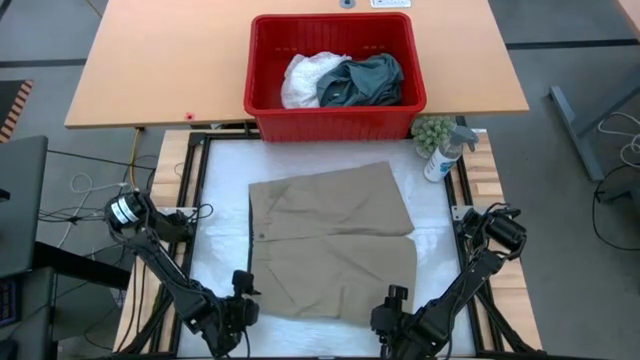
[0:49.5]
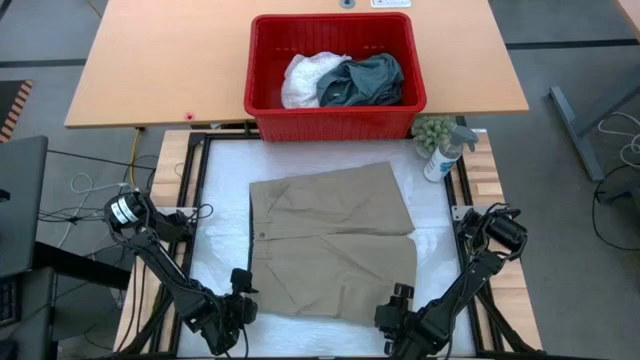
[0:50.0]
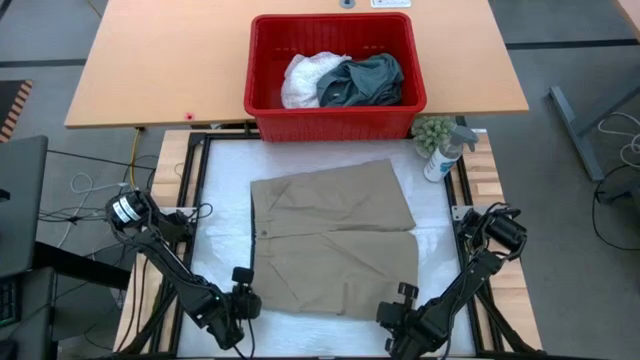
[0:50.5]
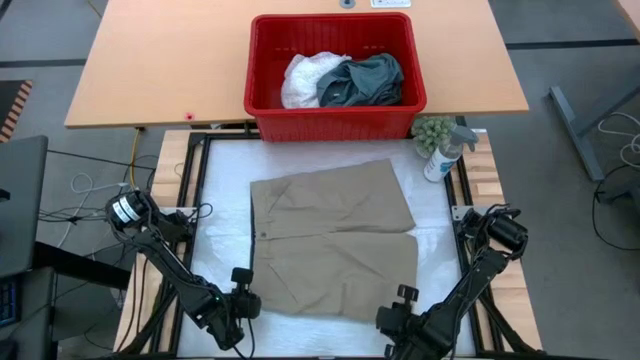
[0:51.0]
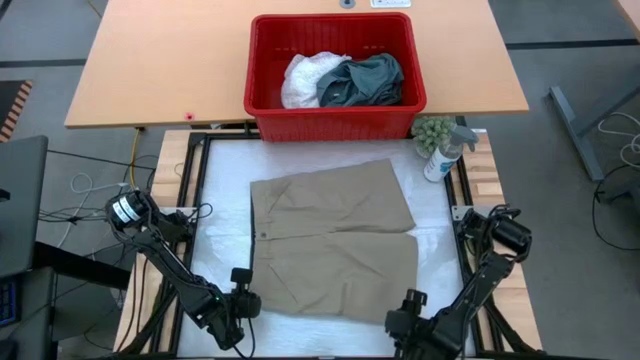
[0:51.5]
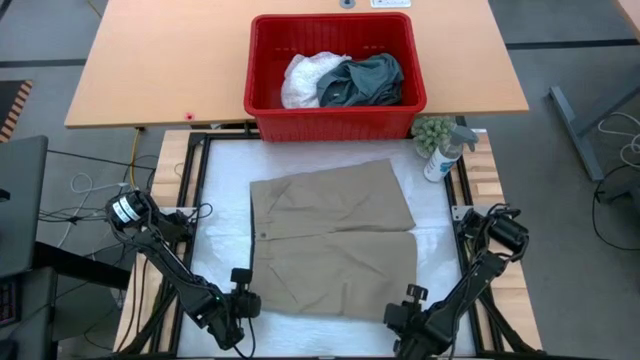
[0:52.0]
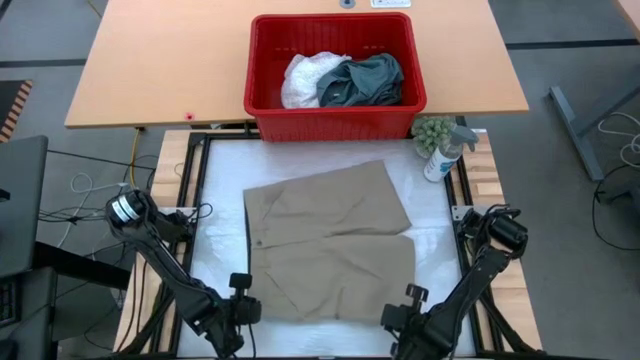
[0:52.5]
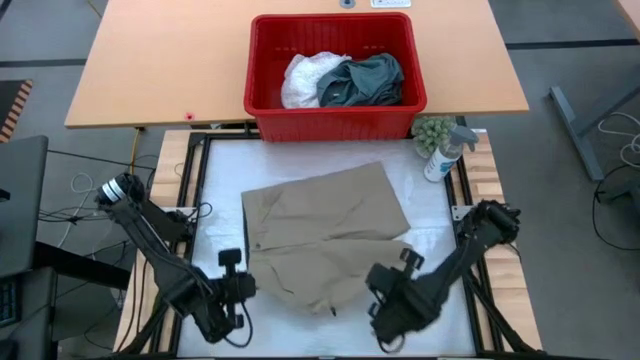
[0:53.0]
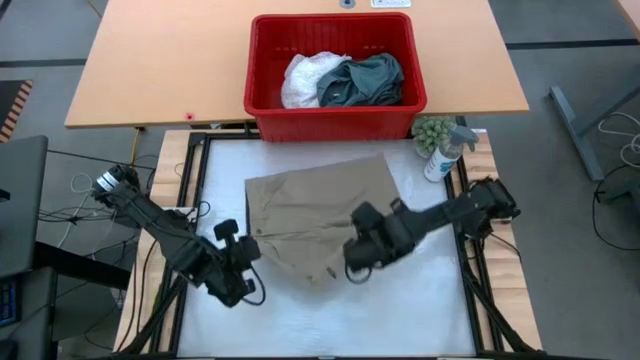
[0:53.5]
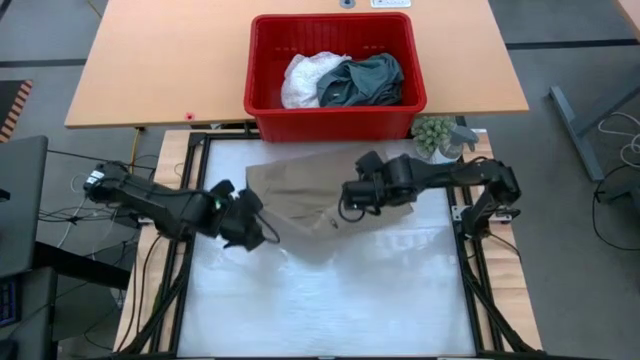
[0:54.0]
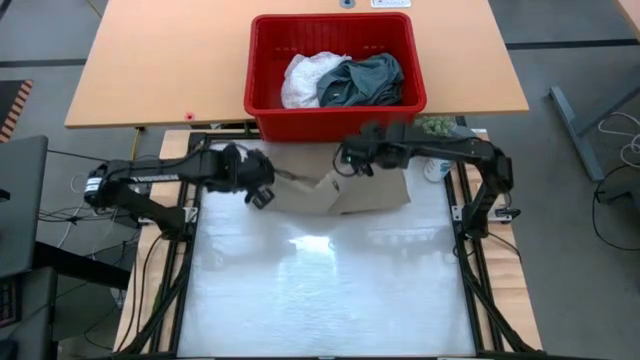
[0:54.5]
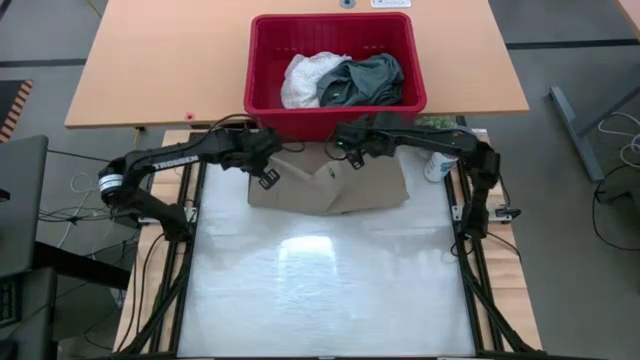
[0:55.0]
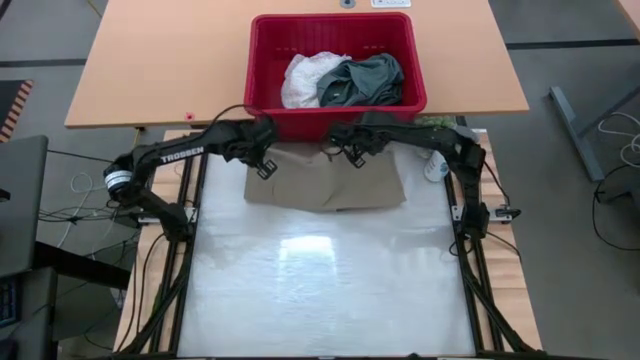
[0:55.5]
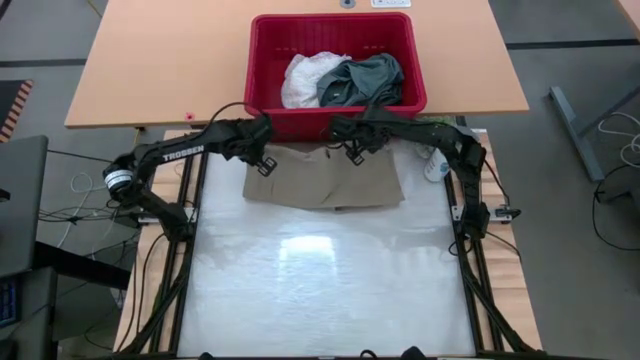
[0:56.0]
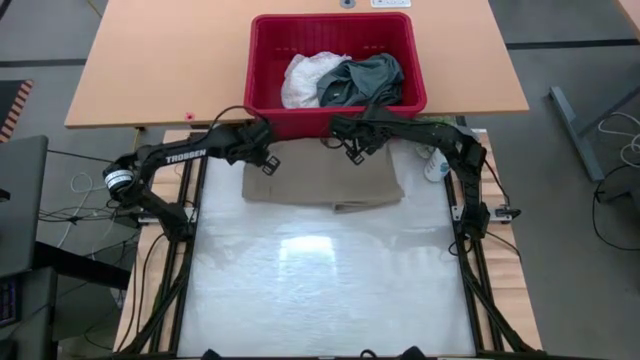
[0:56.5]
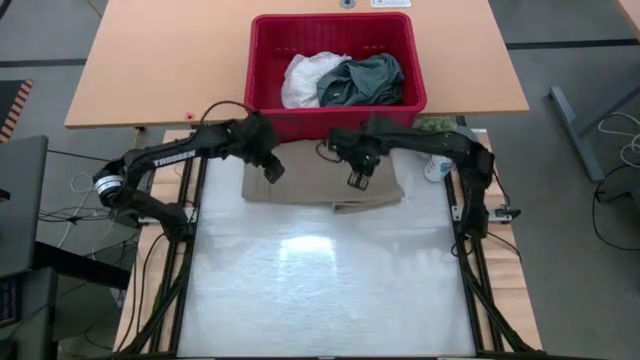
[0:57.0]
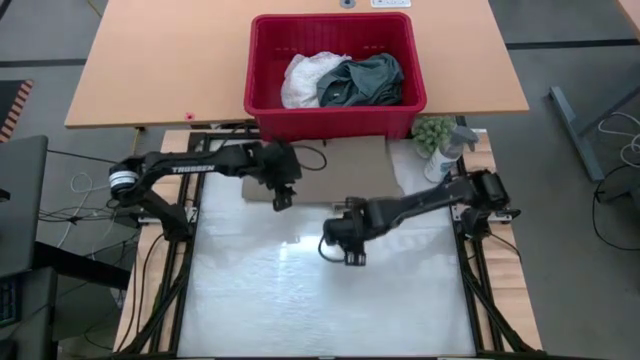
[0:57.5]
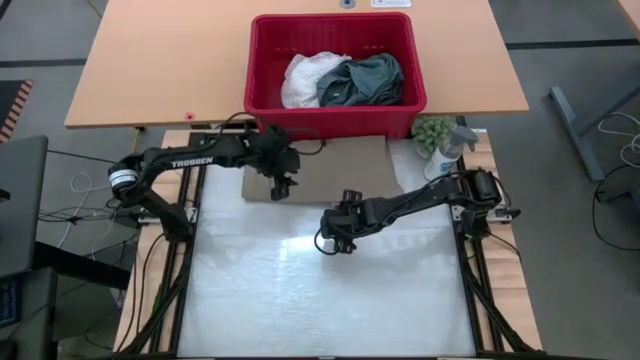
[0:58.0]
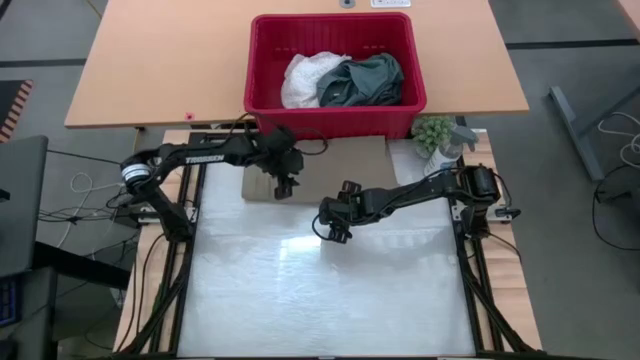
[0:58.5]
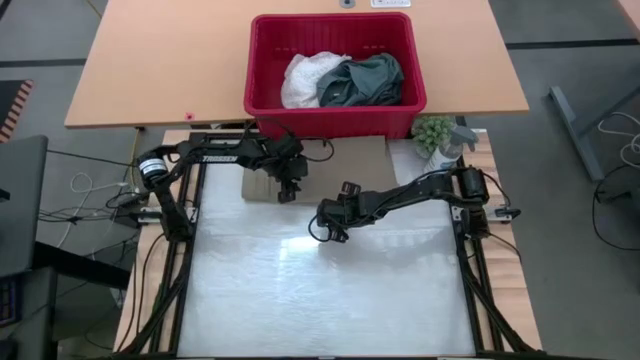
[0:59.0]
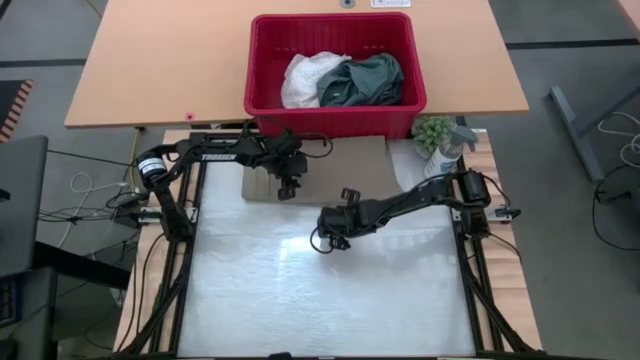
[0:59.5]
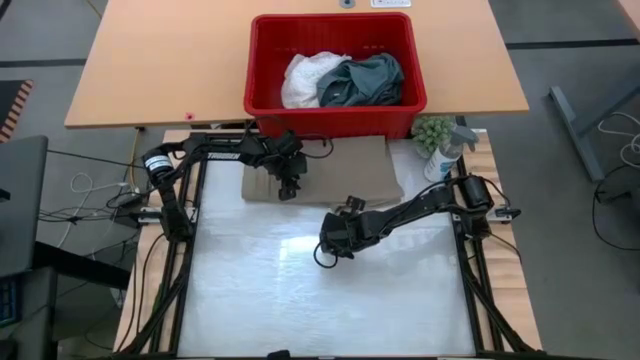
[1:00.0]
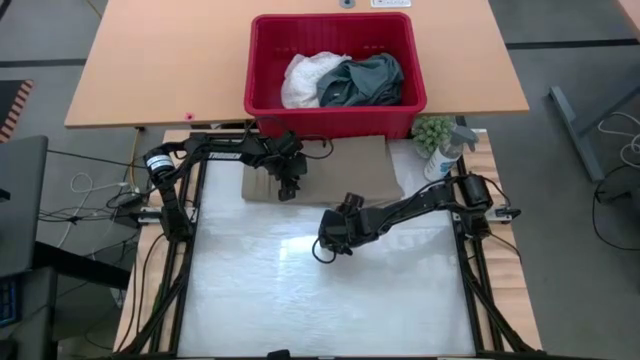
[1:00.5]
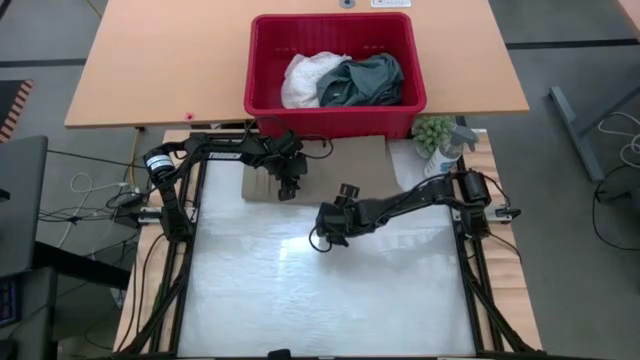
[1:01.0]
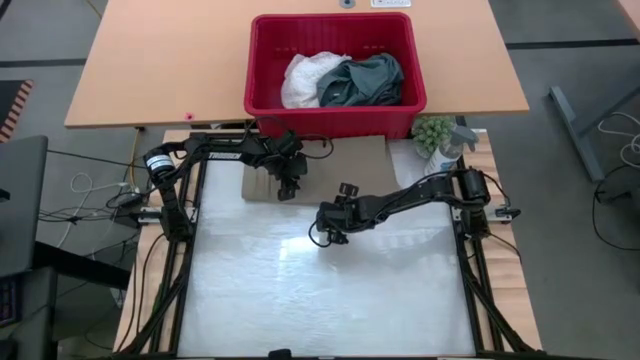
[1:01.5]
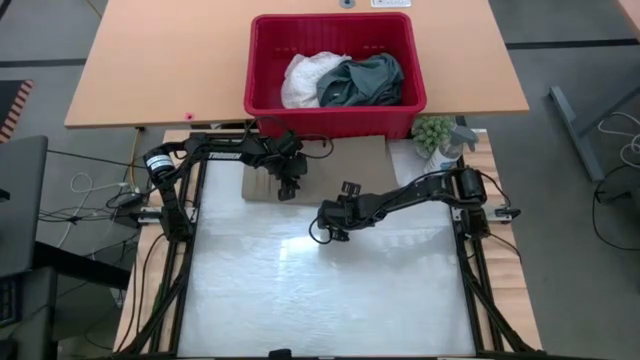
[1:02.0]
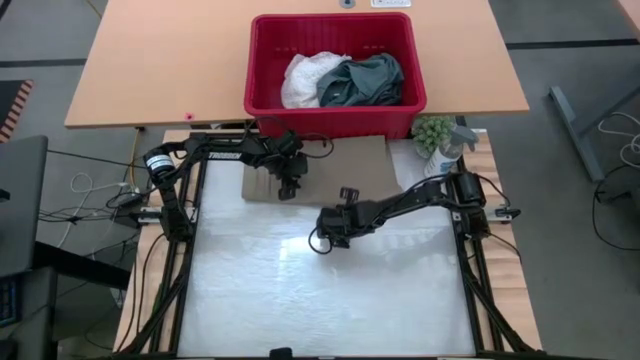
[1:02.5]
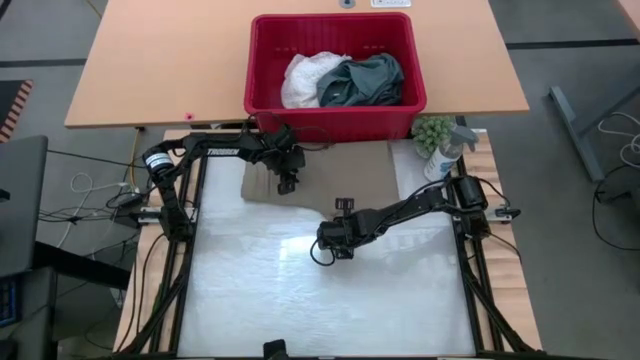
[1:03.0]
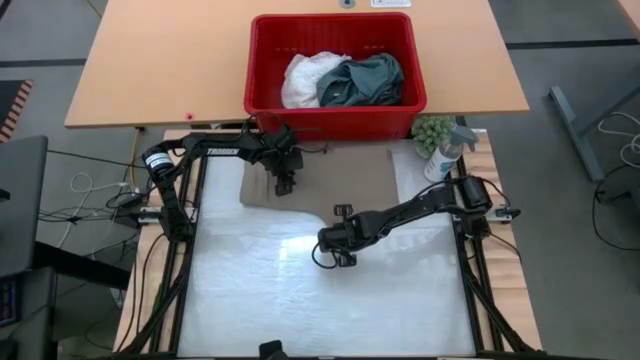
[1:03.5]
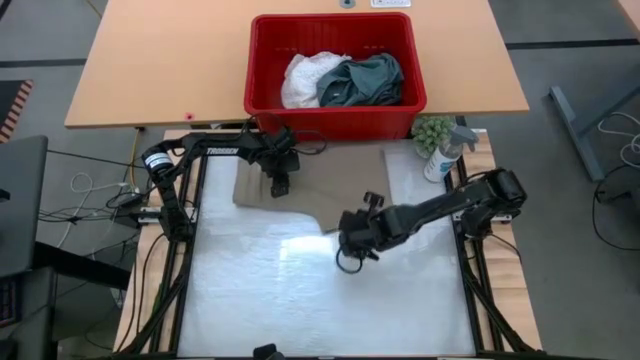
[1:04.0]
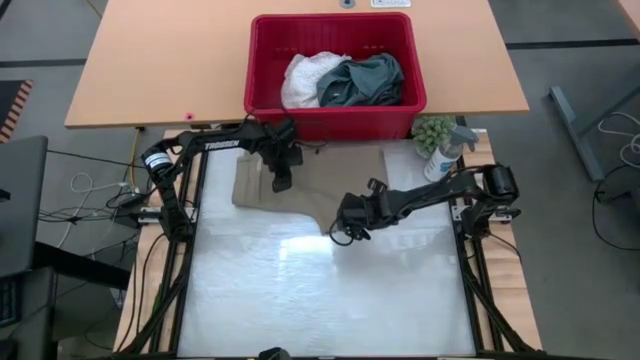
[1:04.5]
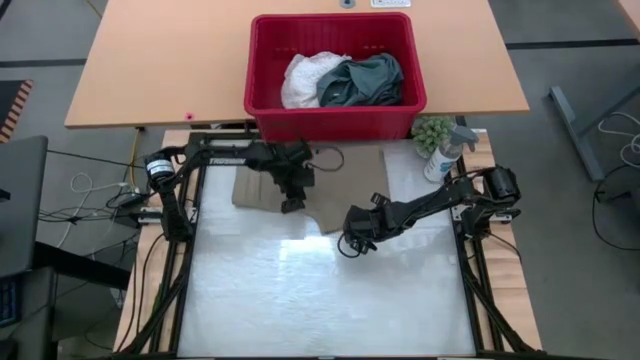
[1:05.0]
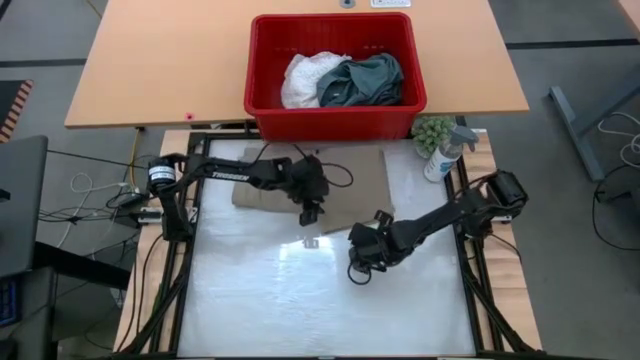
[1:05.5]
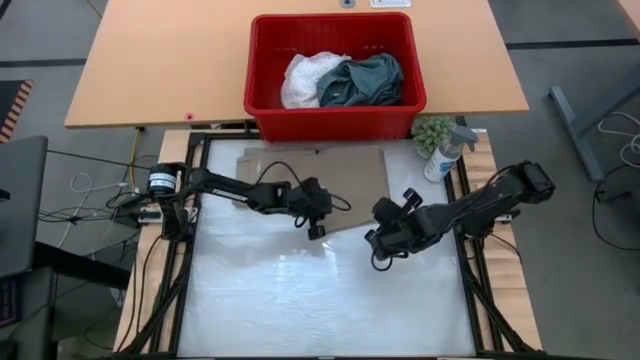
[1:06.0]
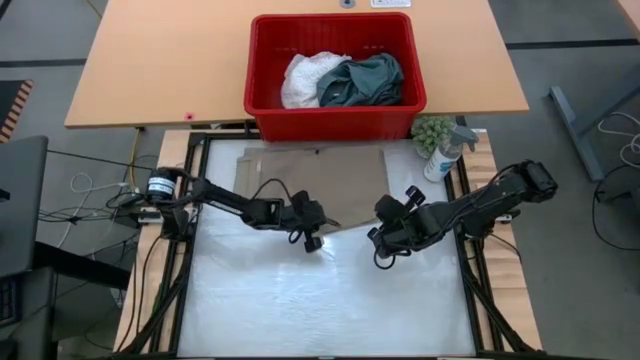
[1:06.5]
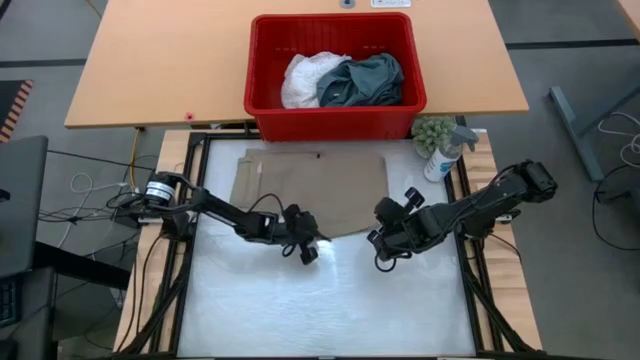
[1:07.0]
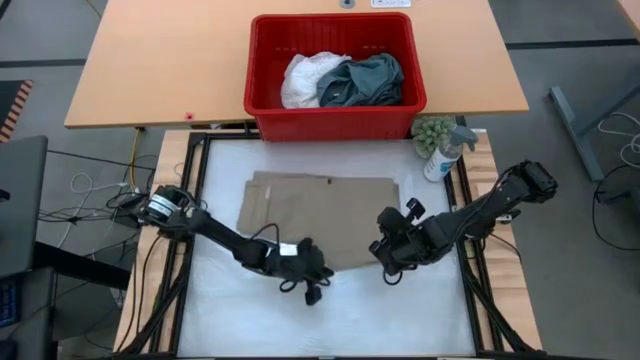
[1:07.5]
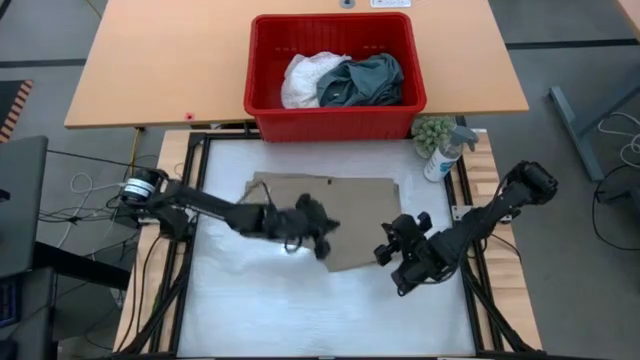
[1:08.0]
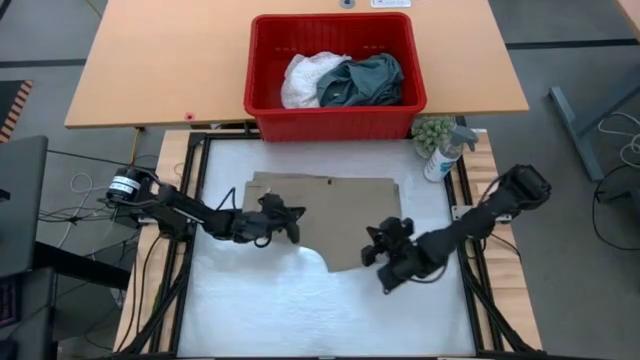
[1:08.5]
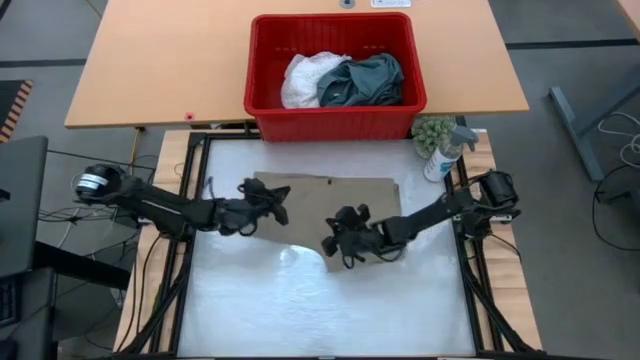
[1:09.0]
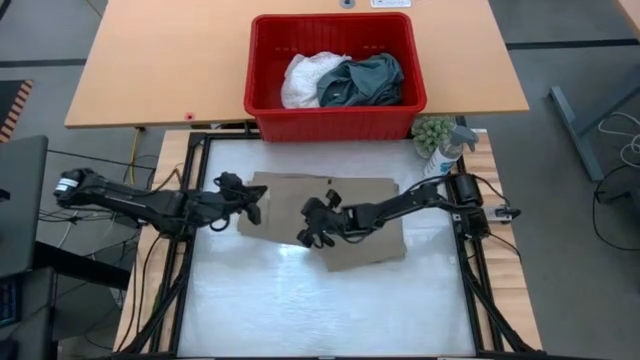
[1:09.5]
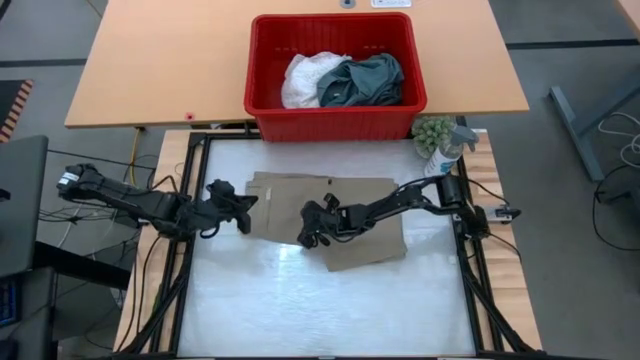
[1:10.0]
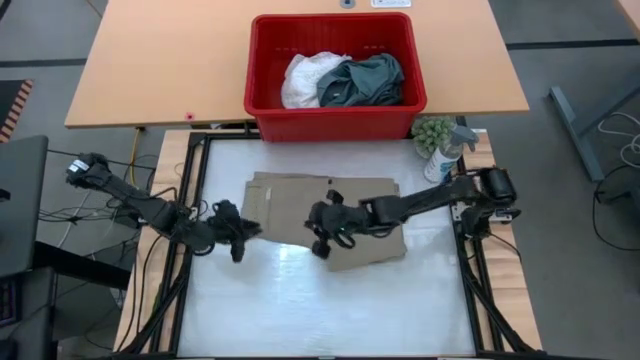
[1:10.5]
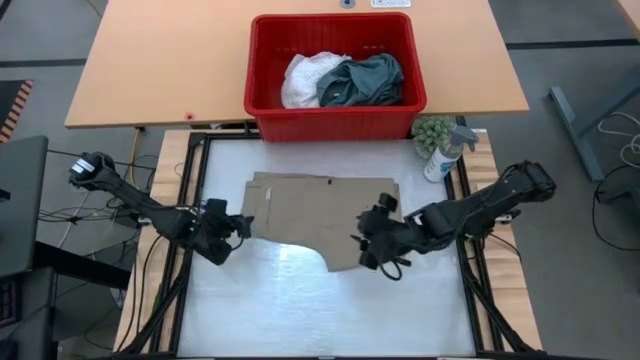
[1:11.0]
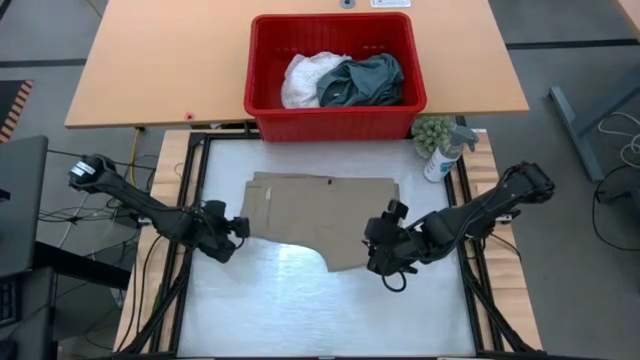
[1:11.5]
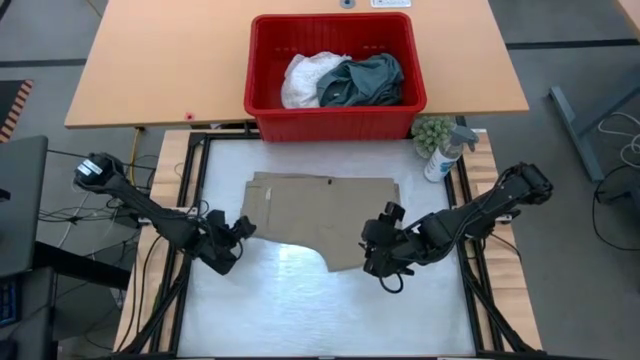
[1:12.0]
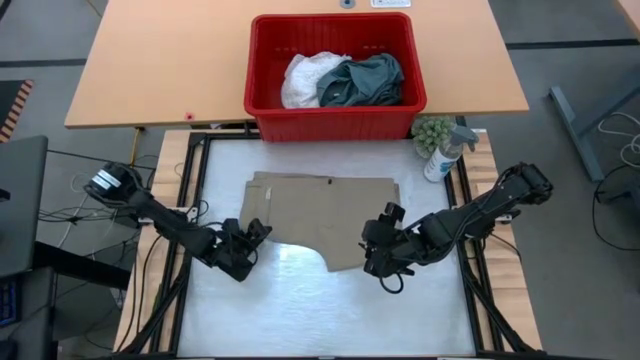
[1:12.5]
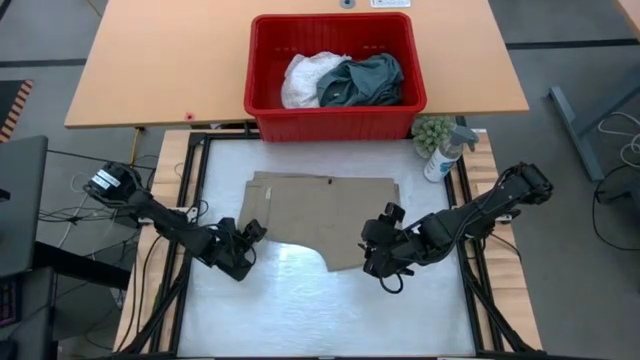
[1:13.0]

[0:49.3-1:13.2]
Task: Fold Laundry from Bin
Fold the brown short pants in the red bin
